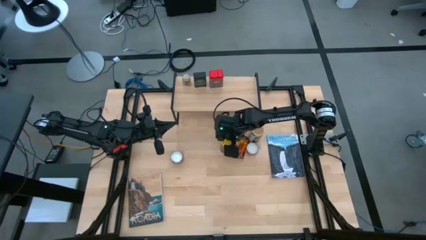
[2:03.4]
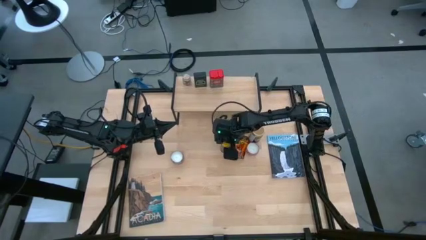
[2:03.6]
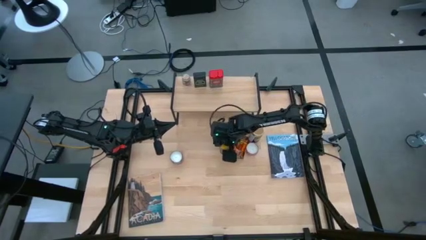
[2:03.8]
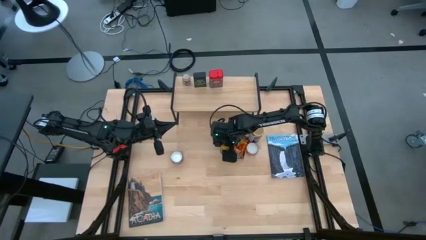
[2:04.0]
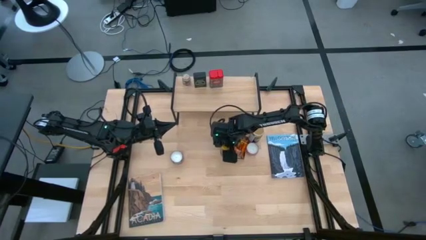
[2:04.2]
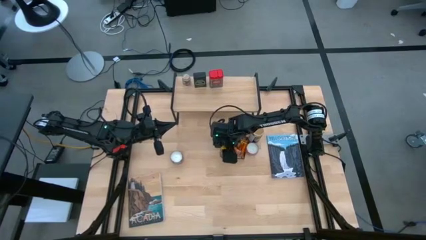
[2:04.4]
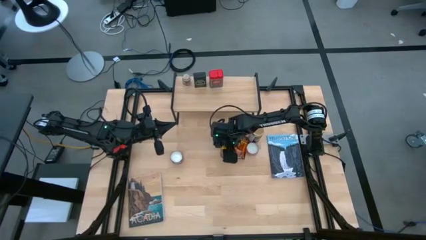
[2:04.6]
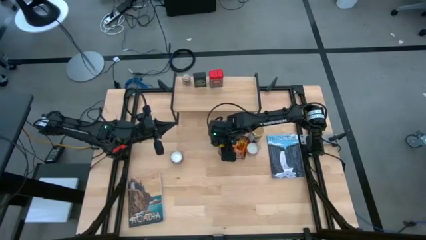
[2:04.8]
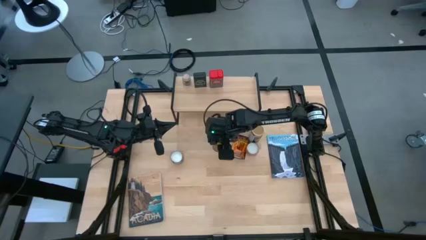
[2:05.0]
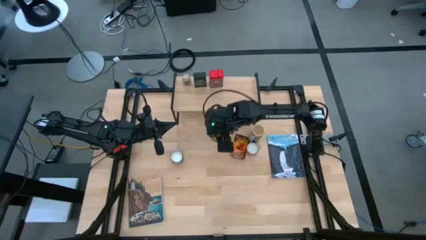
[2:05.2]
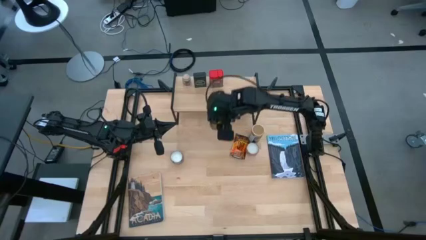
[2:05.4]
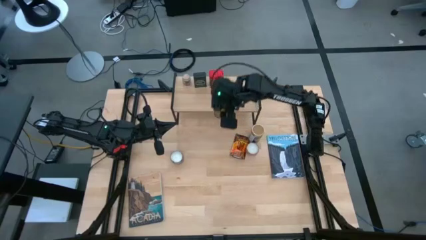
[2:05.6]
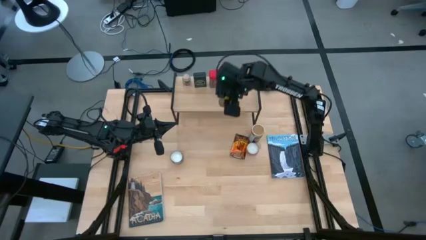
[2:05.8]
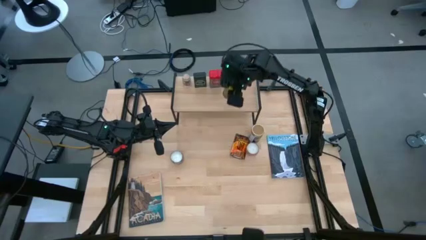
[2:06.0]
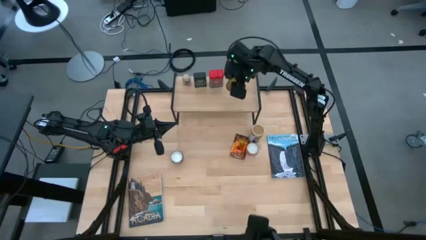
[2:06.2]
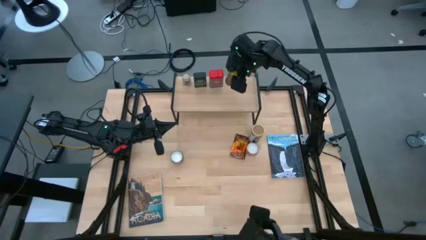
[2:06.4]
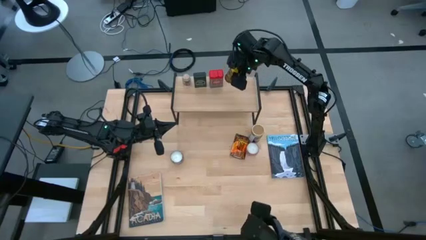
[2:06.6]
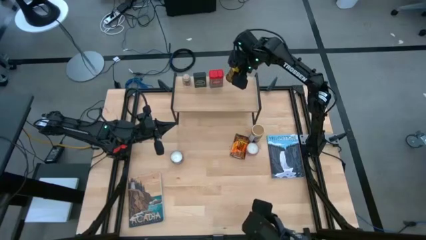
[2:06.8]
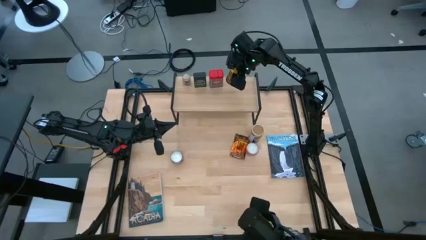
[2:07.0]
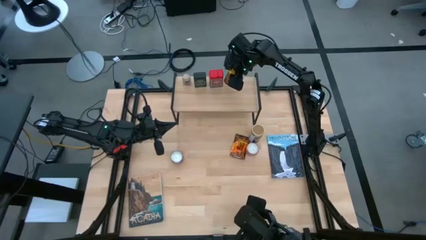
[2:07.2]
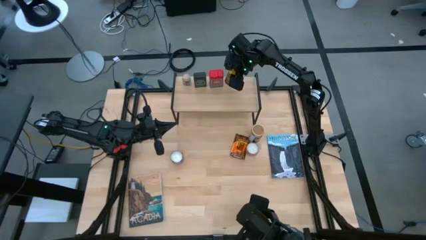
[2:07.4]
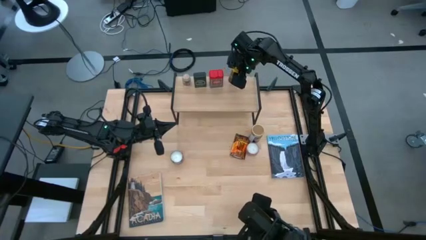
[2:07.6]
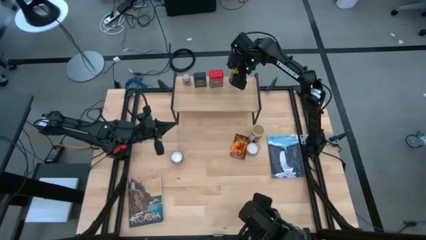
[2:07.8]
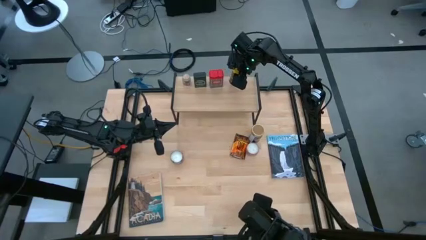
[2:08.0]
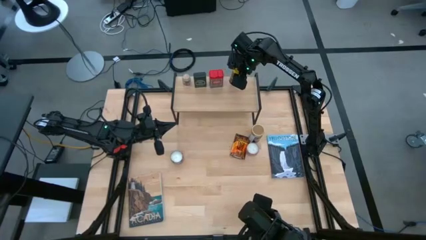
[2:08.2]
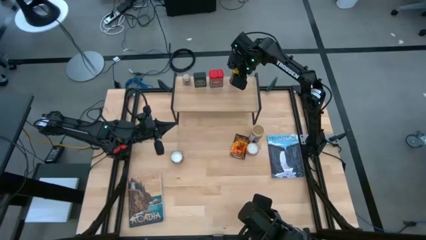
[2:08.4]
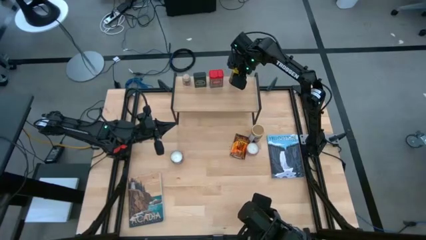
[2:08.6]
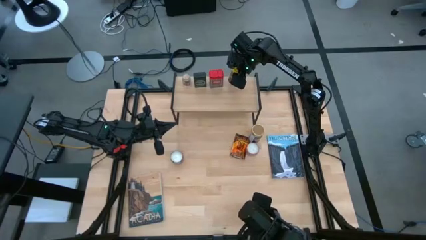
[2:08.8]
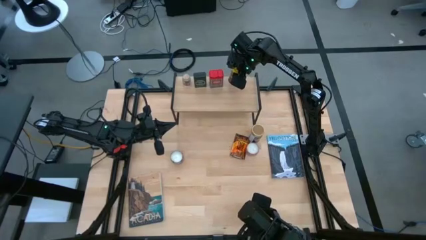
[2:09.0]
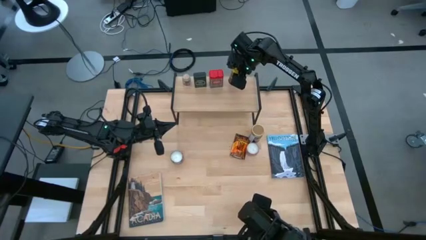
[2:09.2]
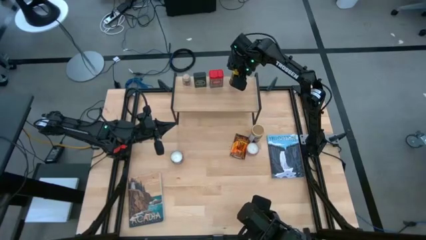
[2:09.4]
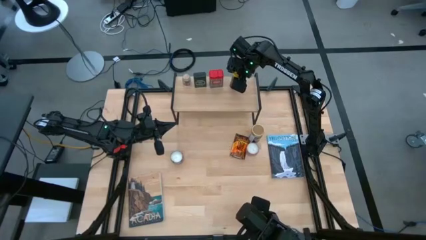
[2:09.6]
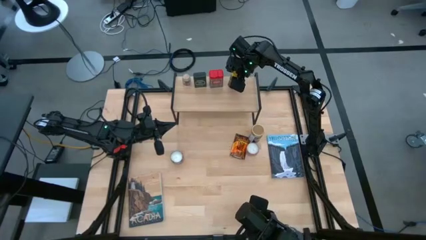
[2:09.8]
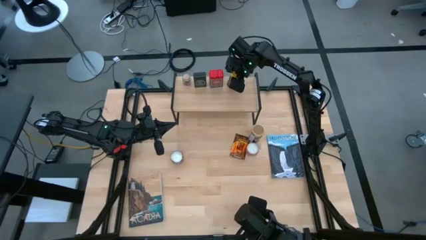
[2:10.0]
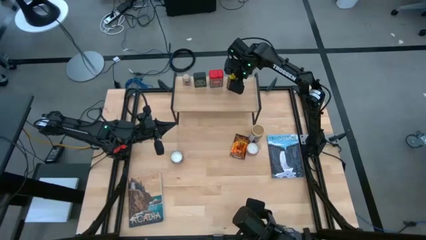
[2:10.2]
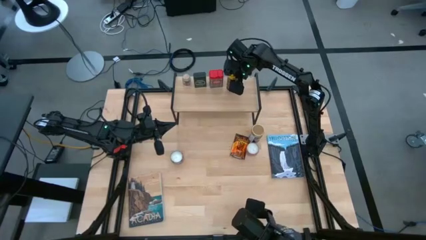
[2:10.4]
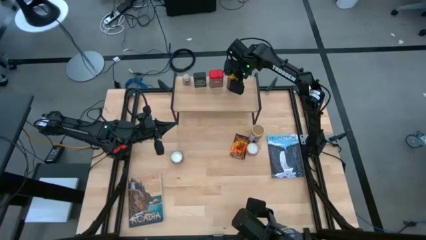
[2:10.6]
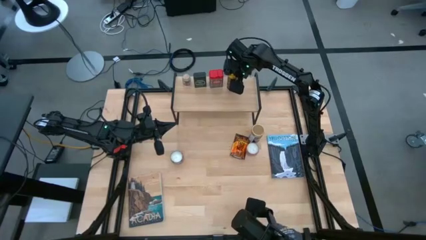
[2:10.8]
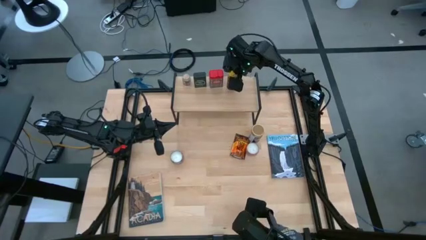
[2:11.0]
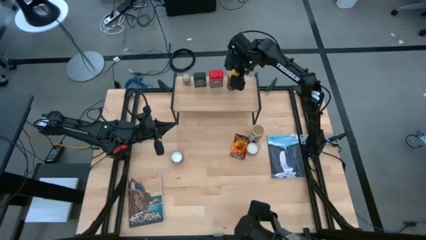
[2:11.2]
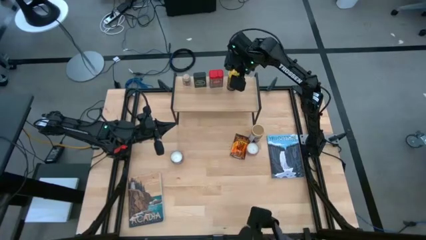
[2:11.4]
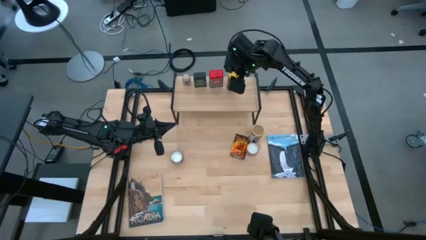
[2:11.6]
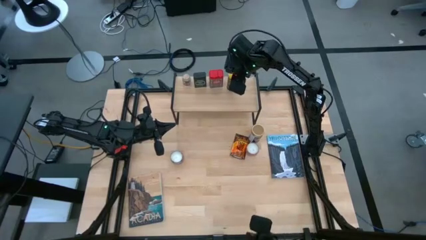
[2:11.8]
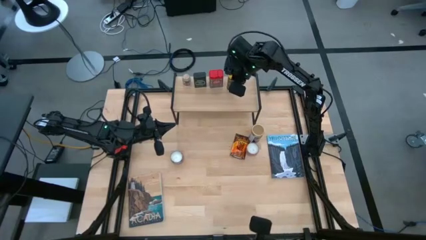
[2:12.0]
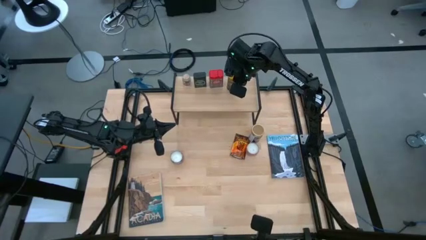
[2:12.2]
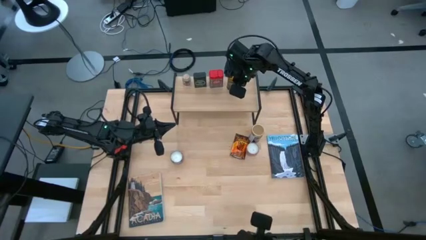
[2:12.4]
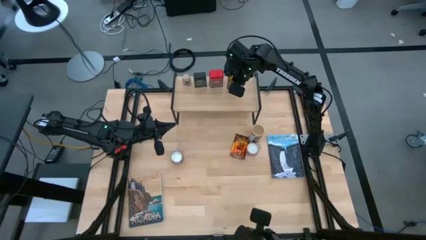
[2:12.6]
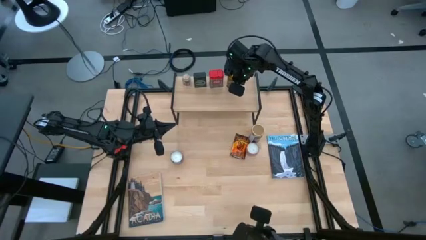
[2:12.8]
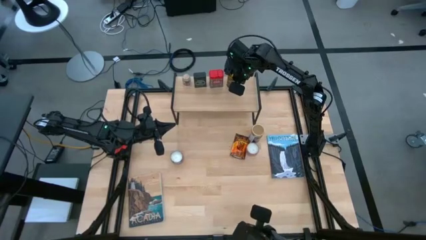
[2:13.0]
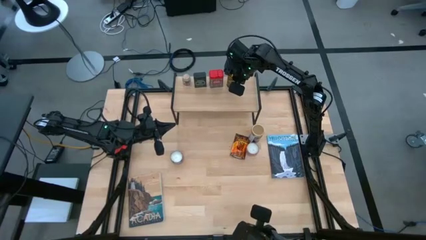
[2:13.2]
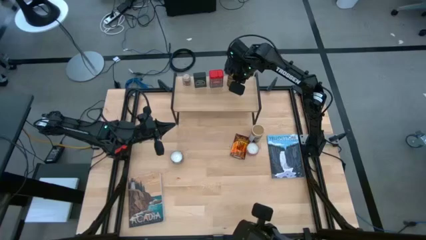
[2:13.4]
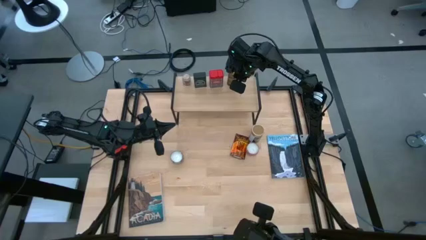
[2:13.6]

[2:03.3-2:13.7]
Task: Shelf spices
Put the yellow seasoning bottle on the shelf

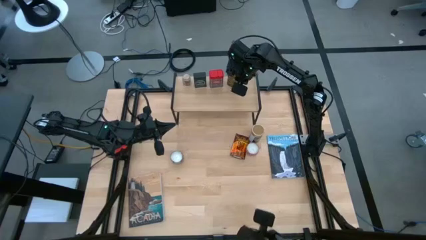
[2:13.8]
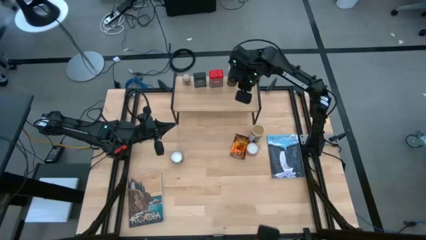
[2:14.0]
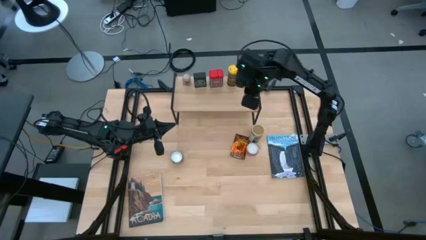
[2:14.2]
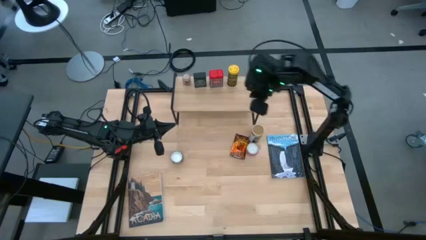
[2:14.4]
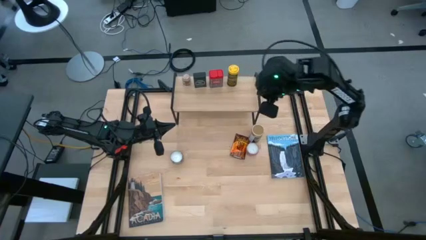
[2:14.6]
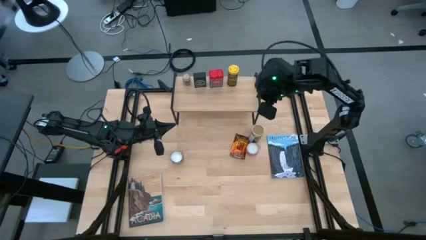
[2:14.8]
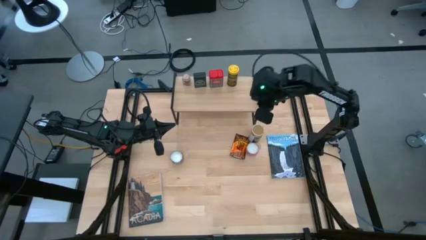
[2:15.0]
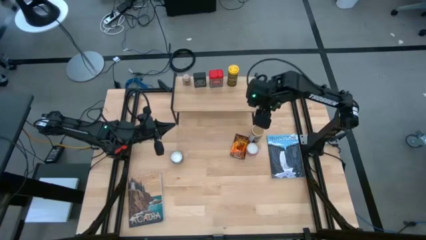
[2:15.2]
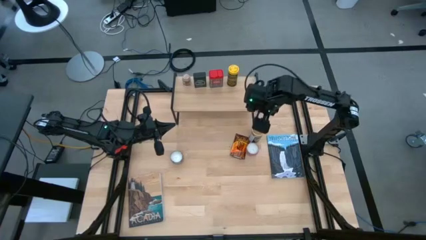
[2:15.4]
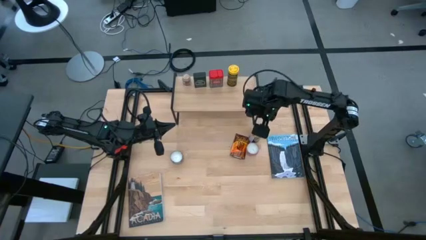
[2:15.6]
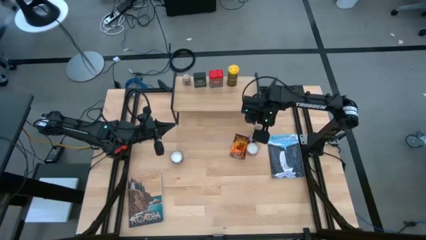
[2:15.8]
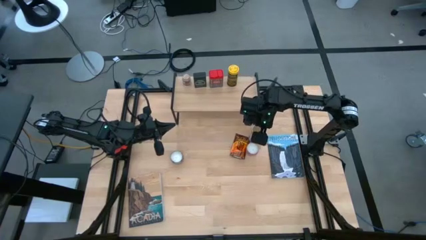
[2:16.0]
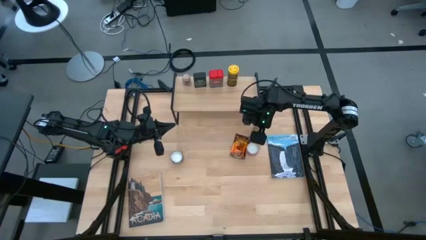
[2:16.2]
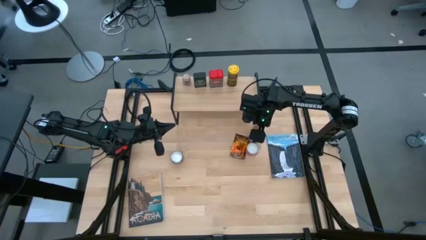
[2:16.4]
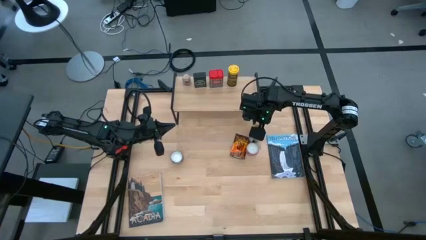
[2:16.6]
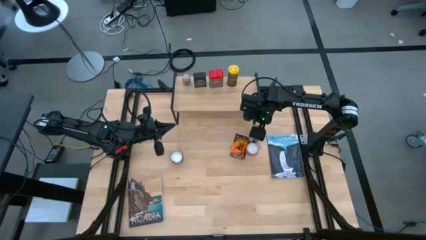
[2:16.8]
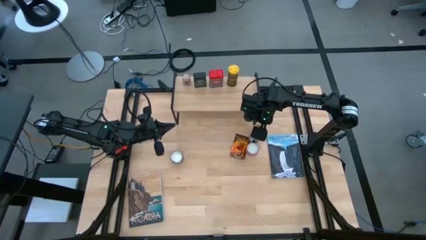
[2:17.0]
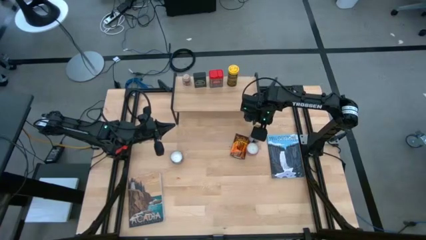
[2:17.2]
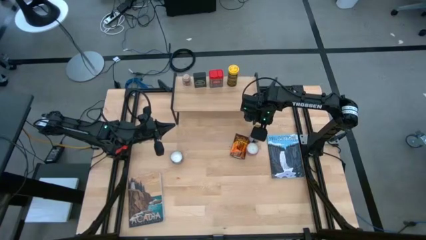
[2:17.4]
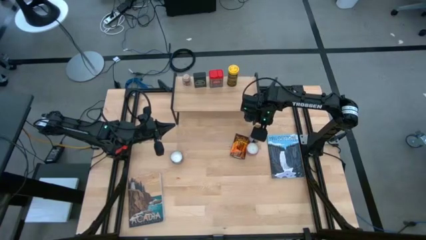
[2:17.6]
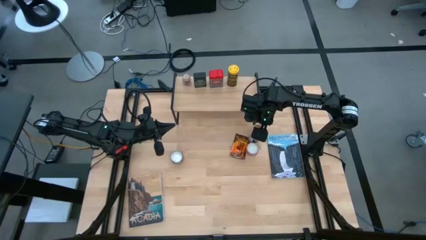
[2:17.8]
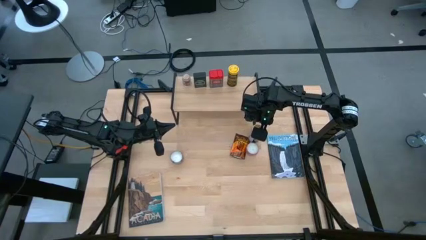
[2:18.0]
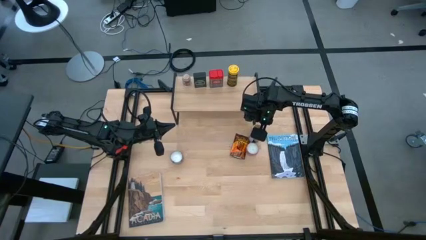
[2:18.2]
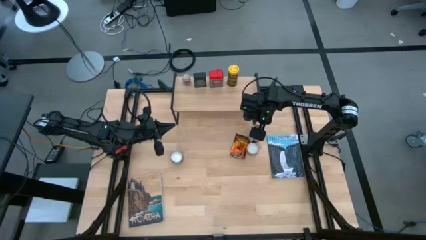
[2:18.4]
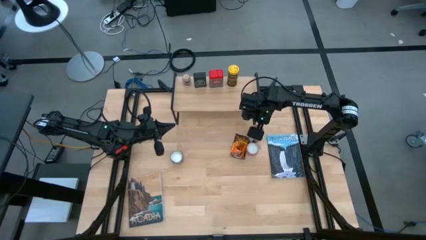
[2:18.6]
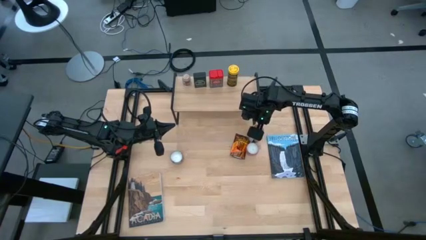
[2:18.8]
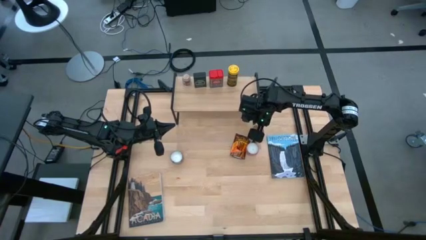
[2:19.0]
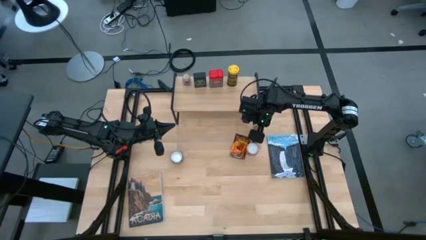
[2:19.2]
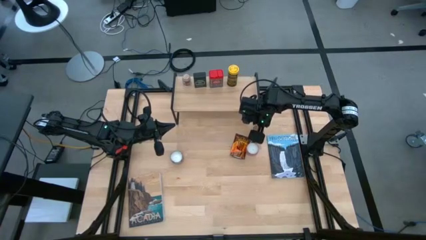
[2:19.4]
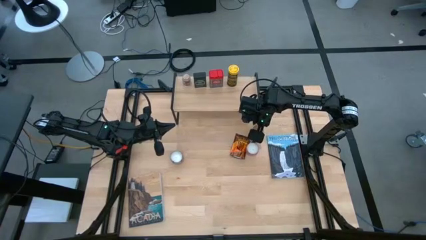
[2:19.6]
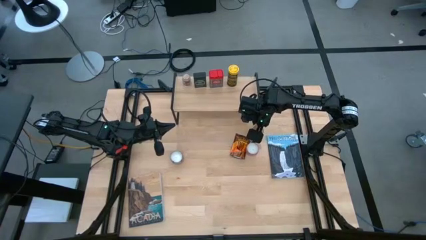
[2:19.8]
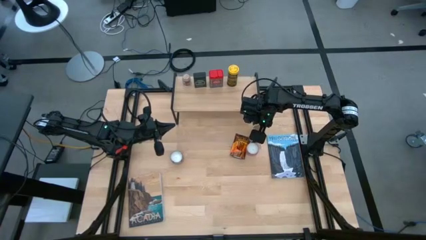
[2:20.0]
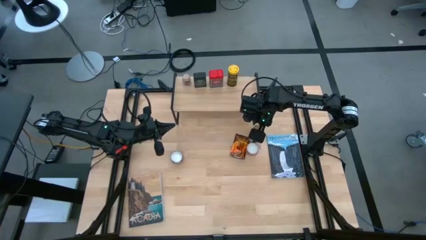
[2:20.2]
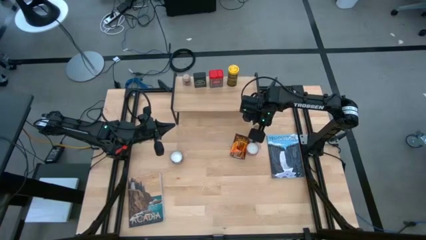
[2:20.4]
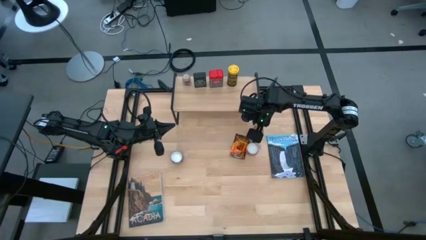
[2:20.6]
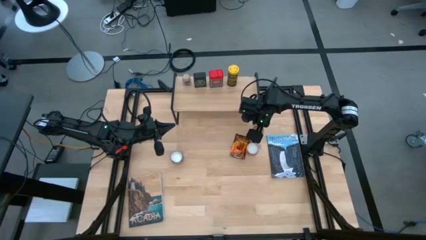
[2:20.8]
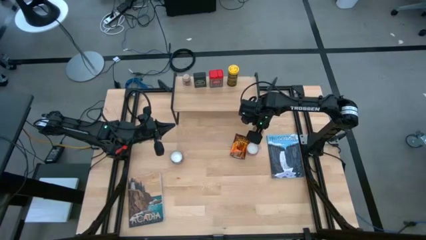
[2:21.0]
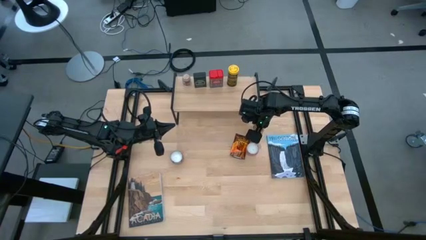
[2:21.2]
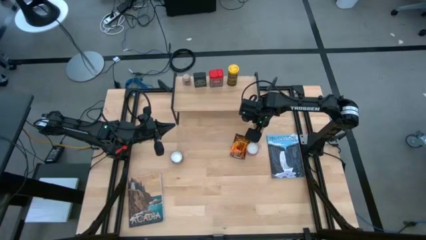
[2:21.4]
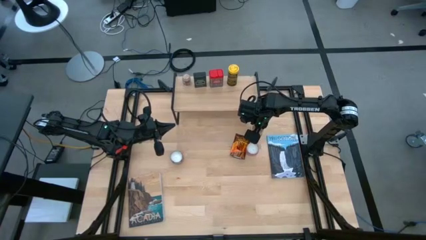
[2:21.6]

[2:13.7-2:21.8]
Put the gold seasoning bottle on the shelf
